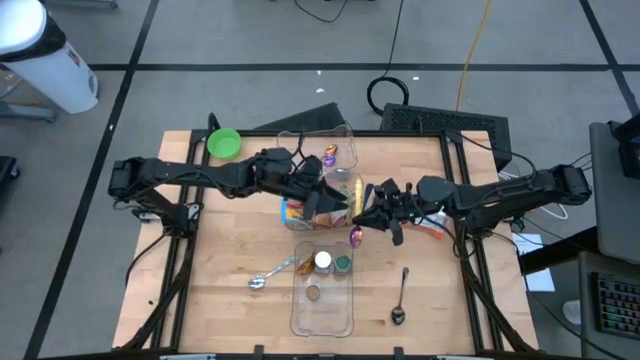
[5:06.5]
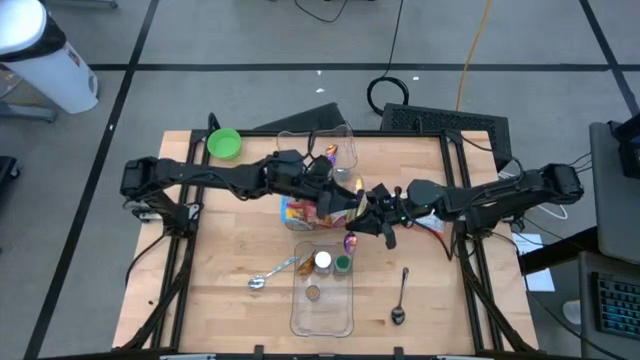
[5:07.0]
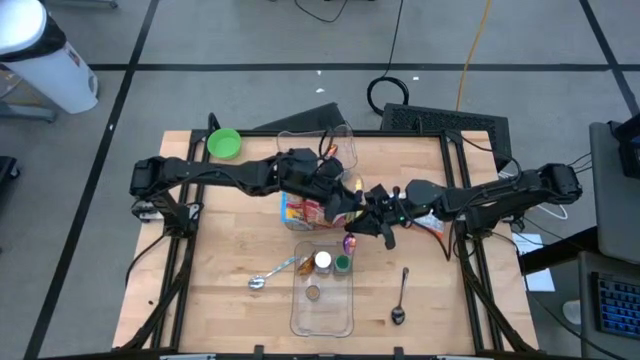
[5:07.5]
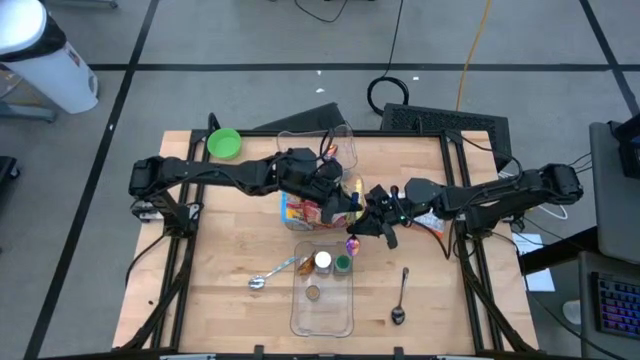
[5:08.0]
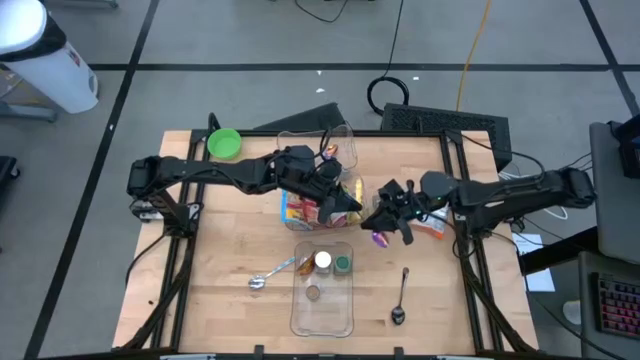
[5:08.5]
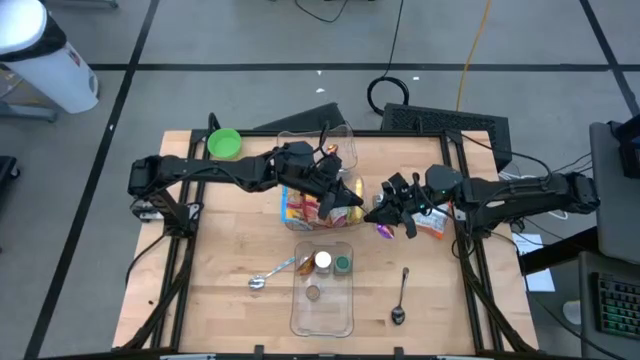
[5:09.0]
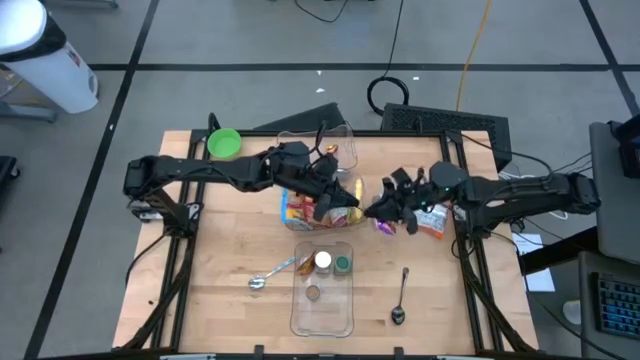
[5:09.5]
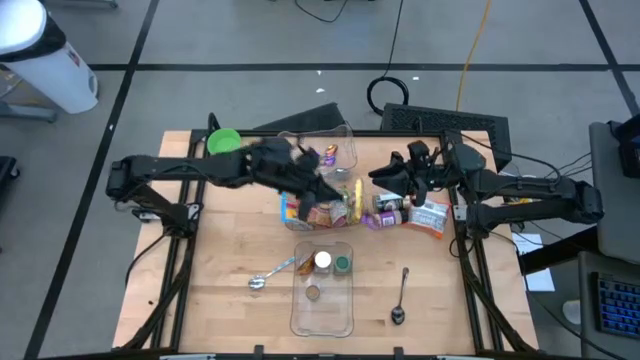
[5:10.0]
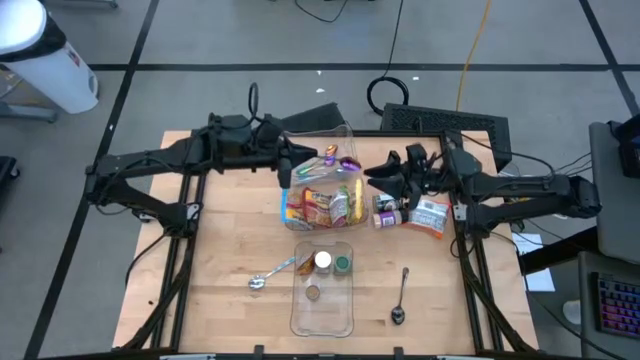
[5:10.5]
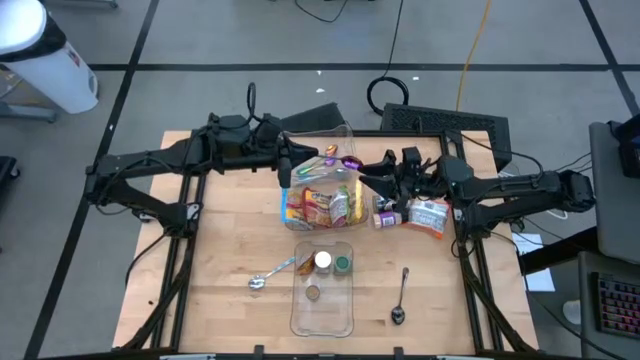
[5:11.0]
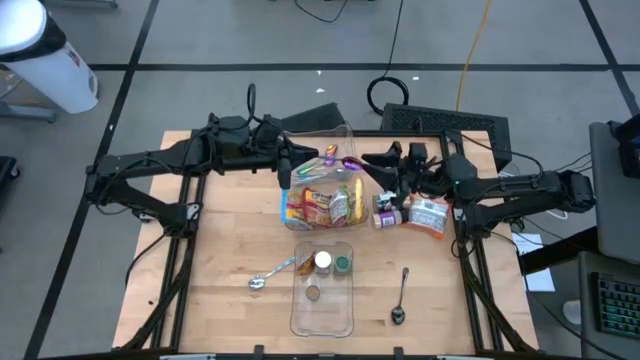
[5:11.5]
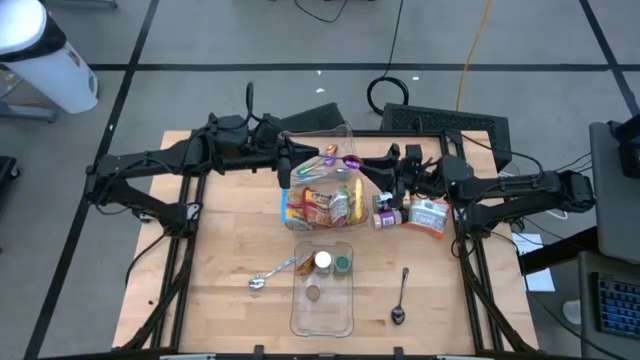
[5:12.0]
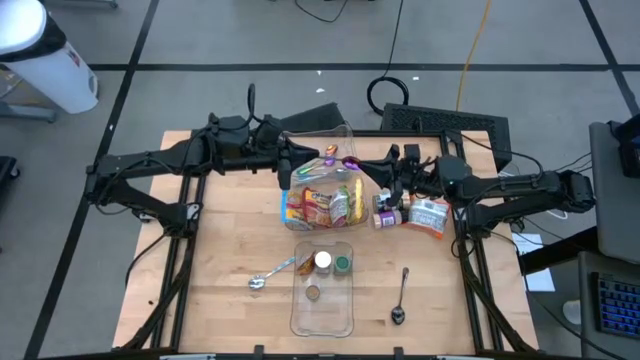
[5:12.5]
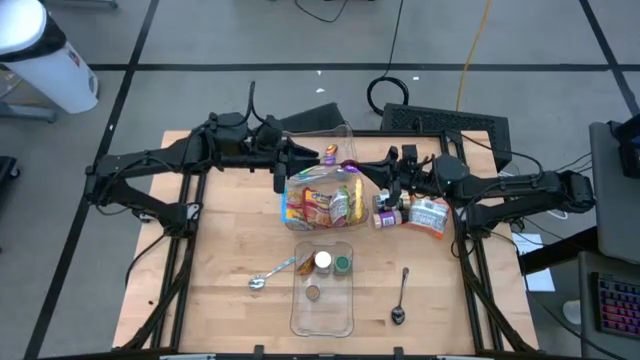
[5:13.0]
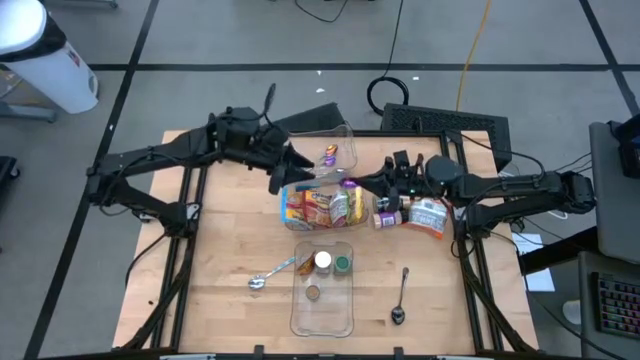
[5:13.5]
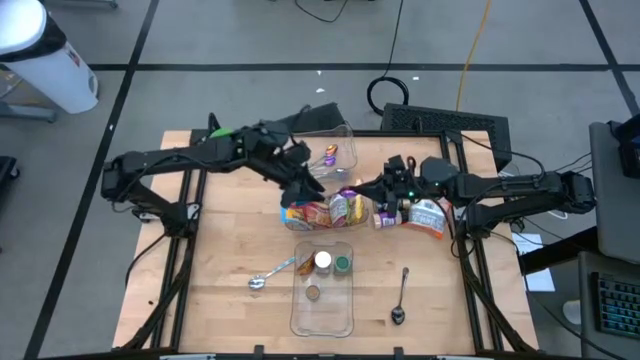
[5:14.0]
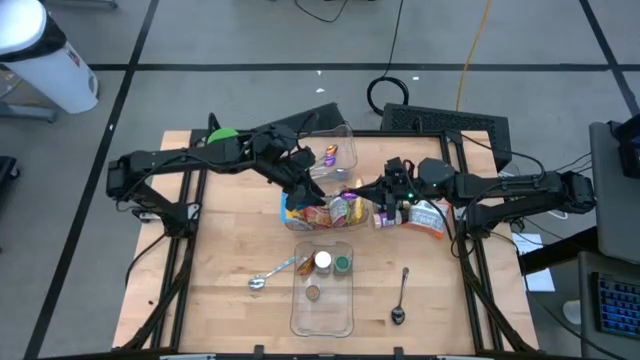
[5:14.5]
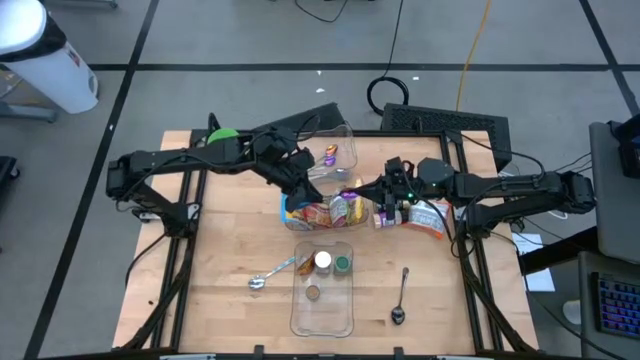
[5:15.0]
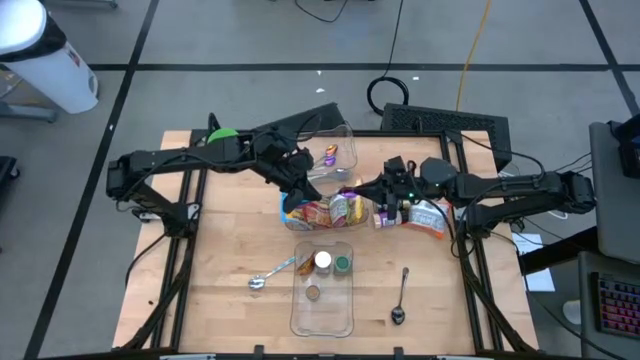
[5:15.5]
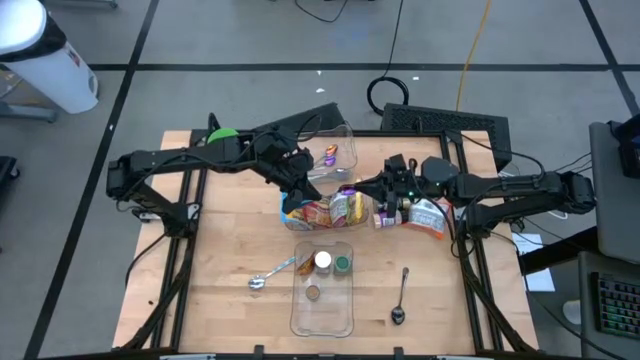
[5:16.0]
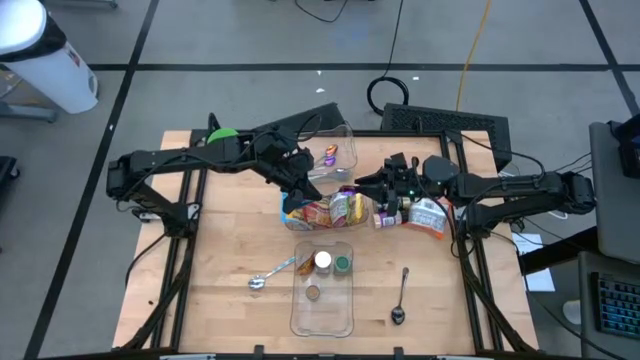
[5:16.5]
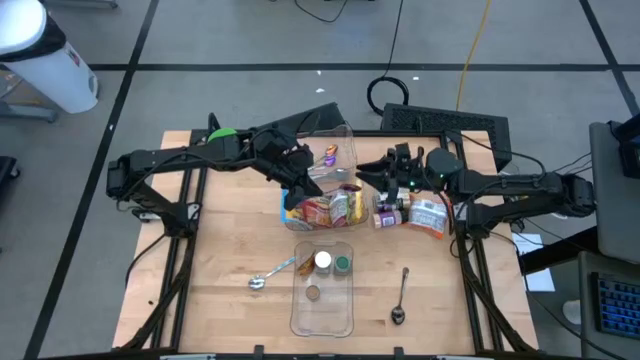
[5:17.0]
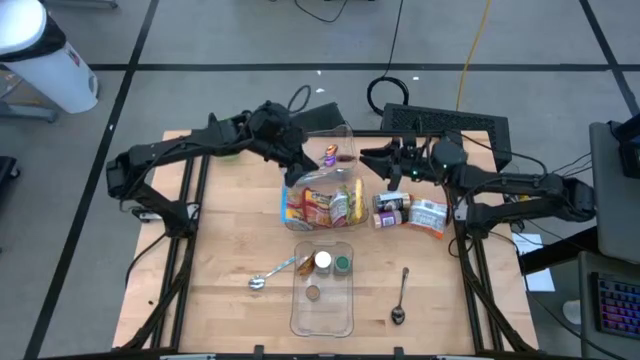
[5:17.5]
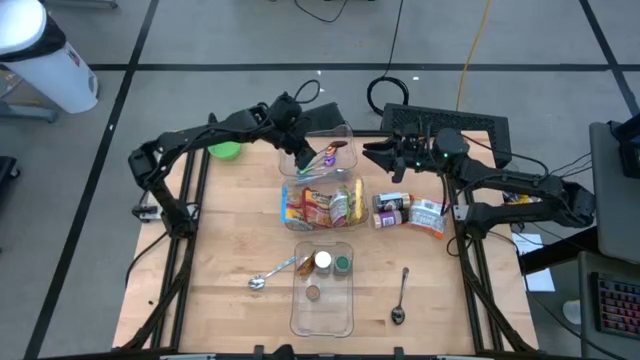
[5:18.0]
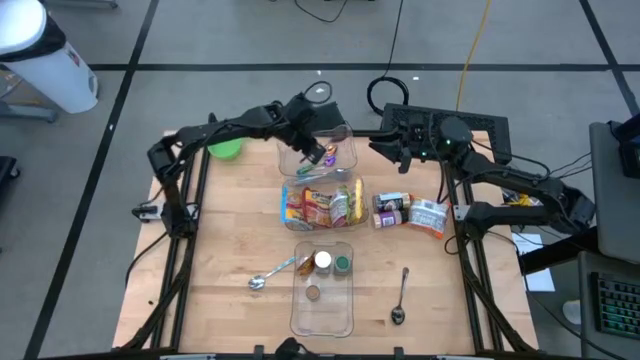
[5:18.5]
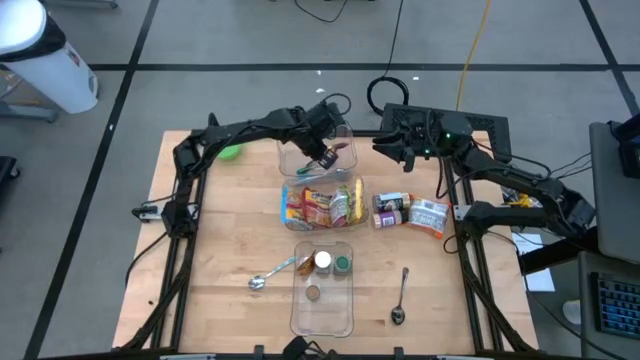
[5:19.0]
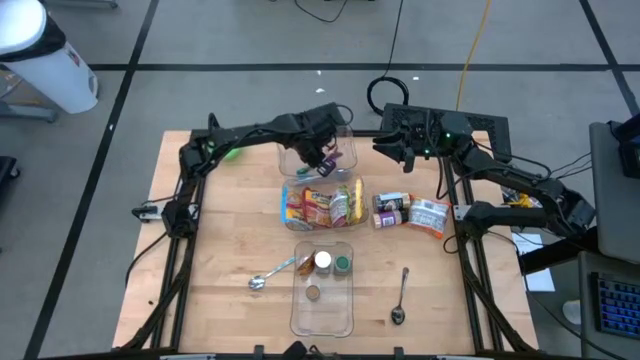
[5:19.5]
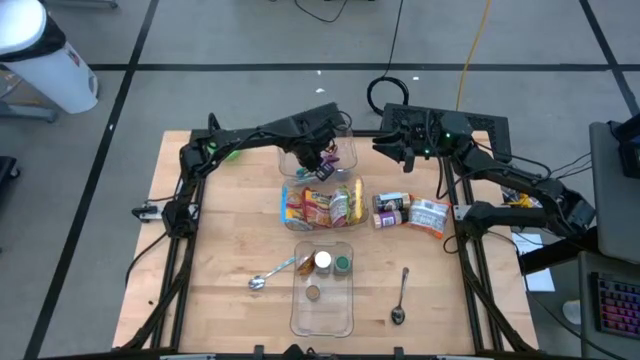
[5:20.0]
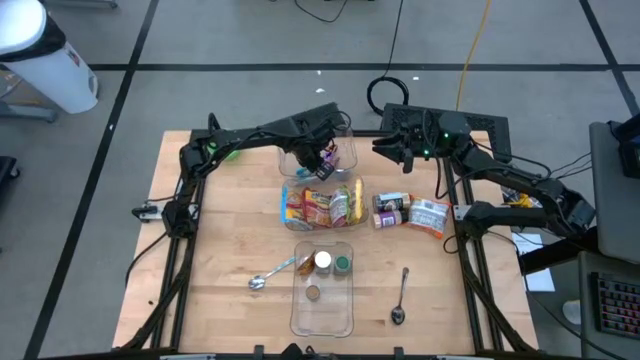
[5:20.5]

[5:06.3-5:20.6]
Task: Pick & Place Food Item
Put the purple spoon into the top transparent bin

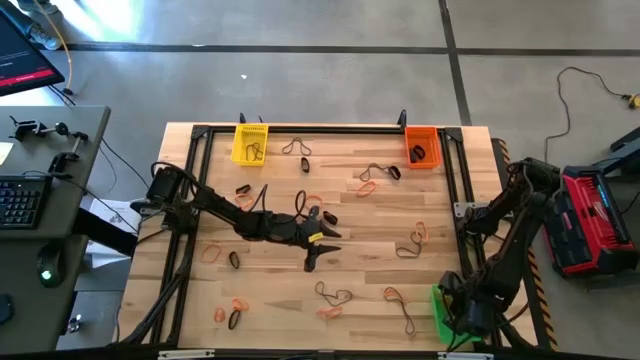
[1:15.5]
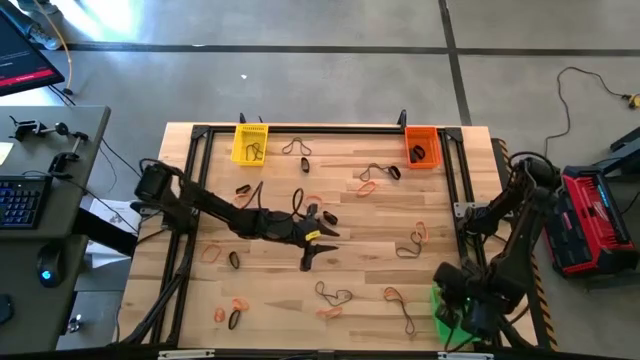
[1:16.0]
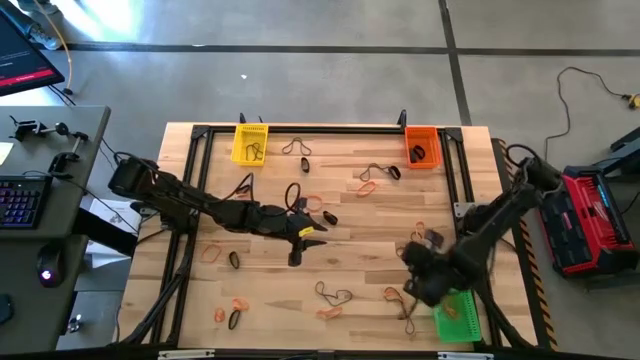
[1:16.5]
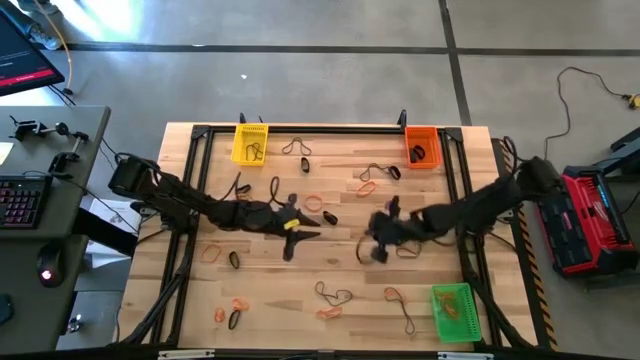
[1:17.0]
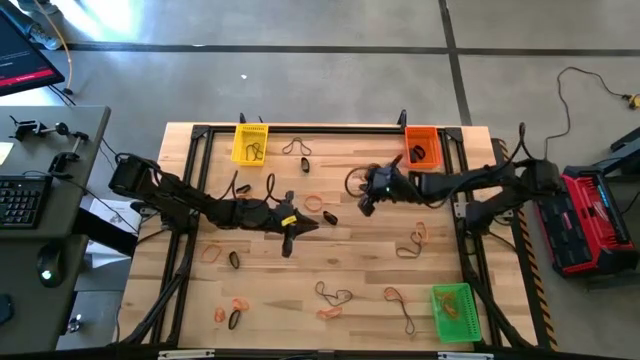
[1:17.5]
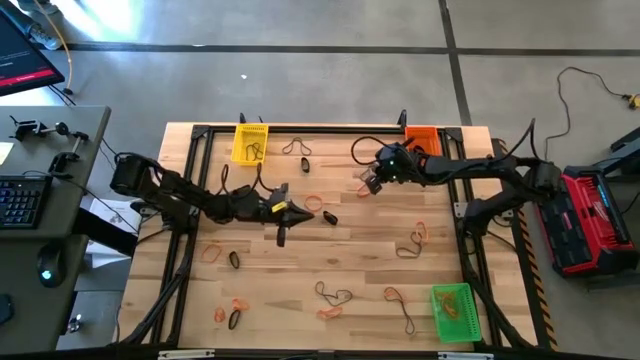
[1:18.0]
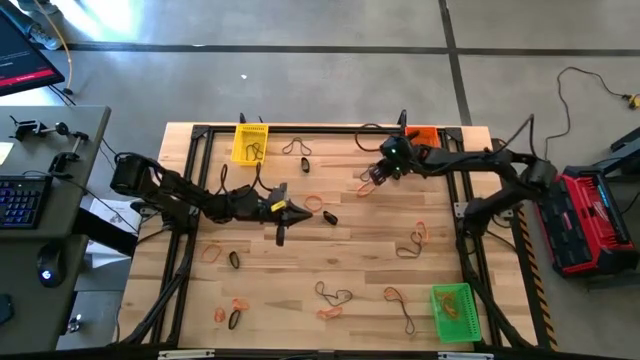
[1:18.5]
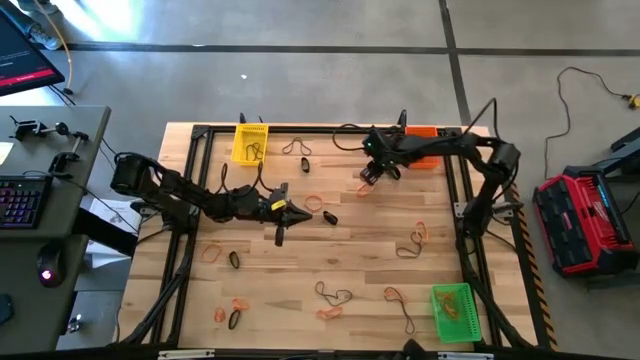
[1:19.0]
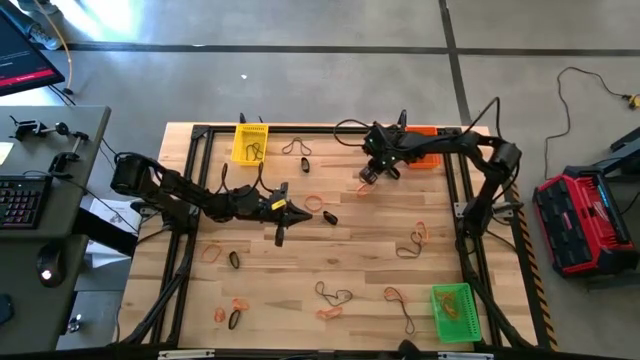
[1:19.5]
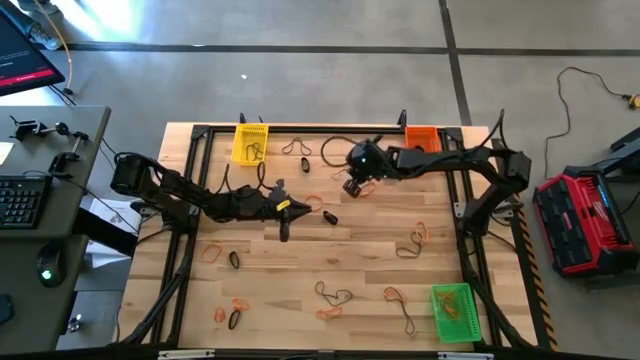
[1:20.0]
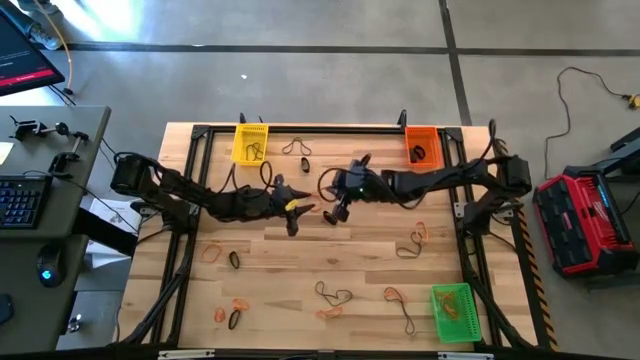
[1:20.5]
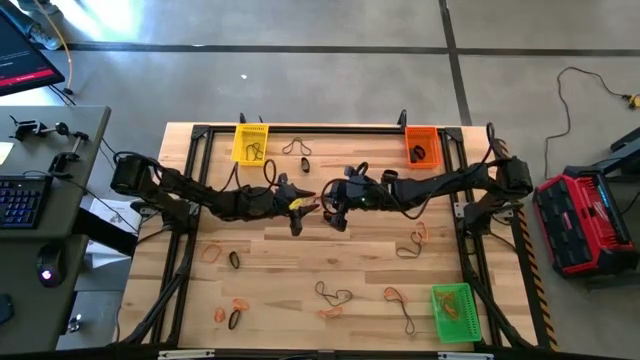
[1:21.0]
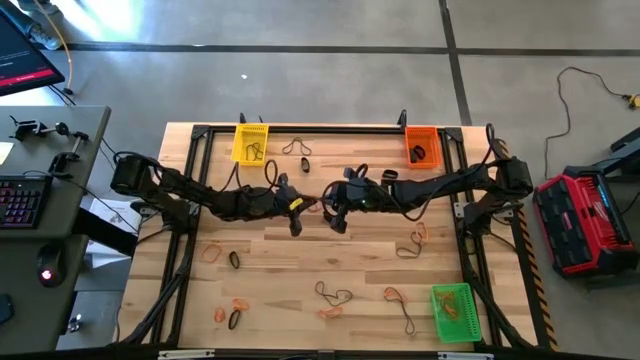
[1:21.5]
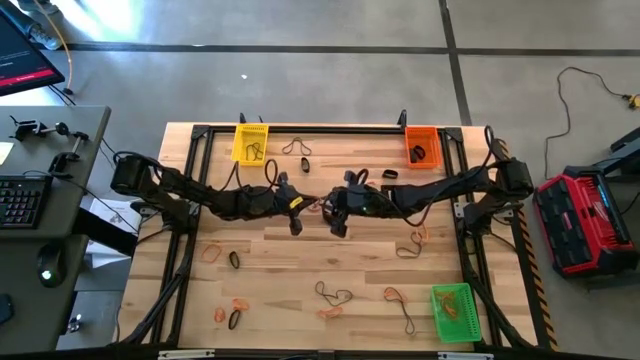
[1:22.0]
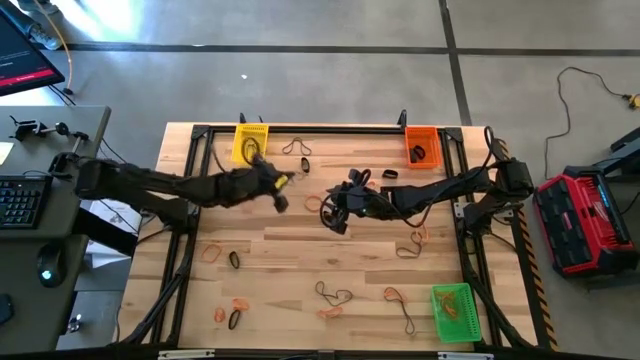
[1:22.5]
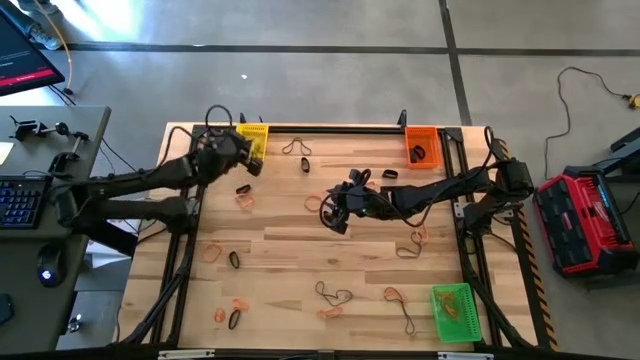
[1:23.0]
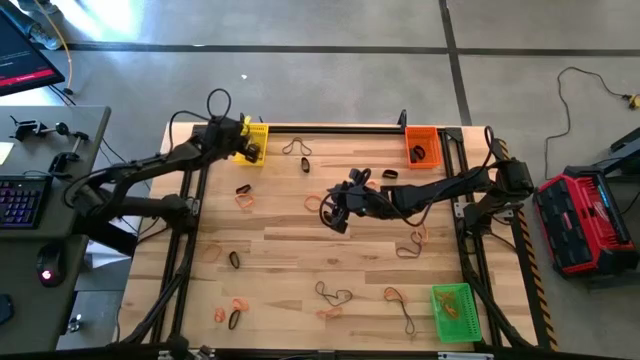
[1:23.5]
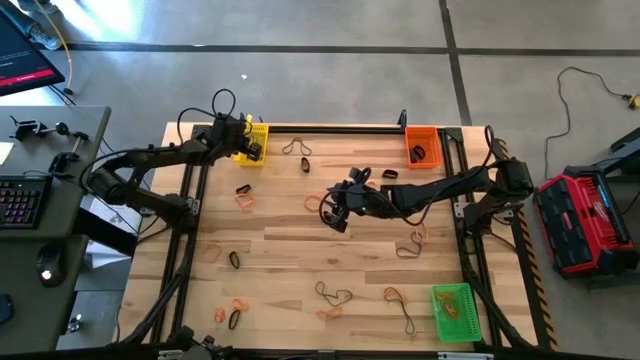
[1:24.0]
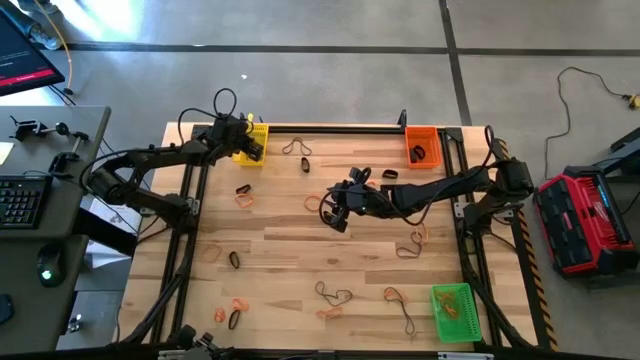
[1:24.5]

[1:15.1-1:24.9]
Task: Sort rubber bands into baskets
Put the purple rubber band into the yellow bin
